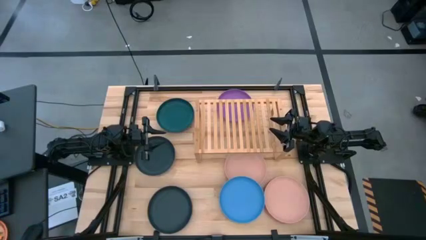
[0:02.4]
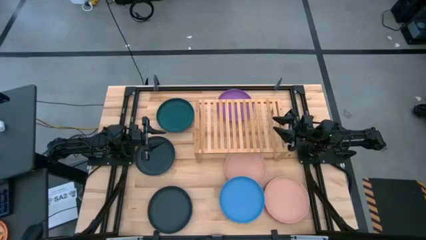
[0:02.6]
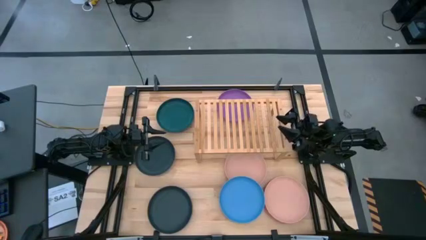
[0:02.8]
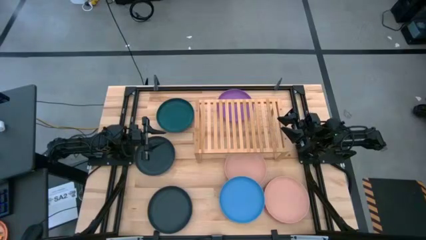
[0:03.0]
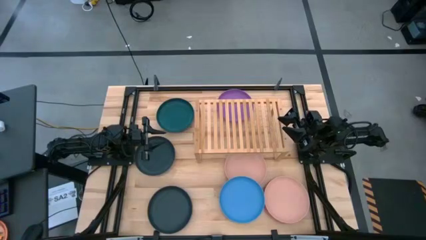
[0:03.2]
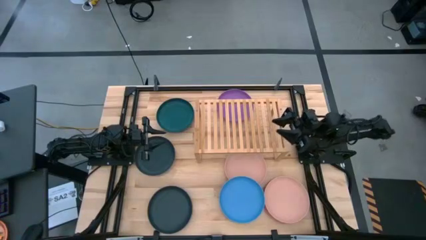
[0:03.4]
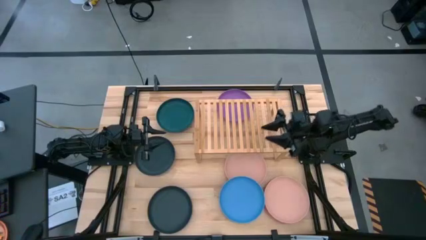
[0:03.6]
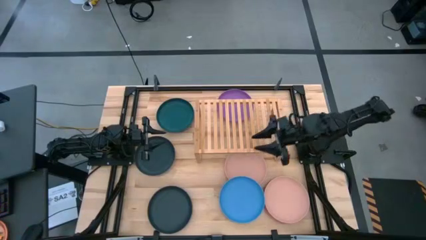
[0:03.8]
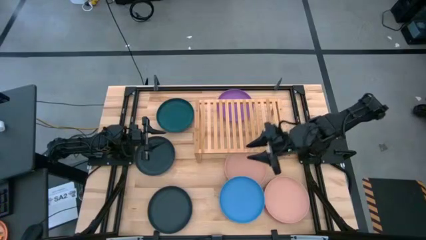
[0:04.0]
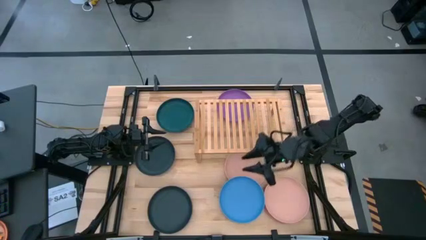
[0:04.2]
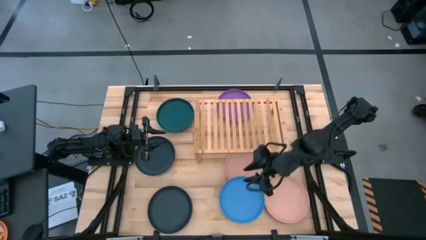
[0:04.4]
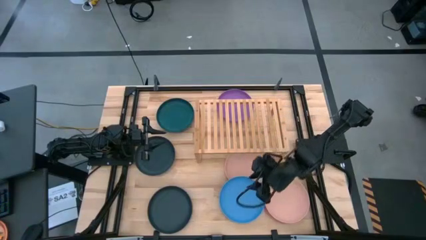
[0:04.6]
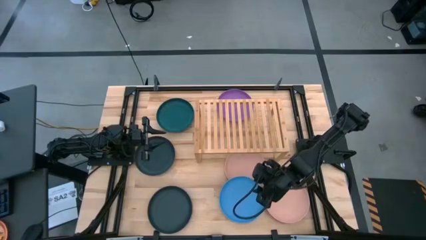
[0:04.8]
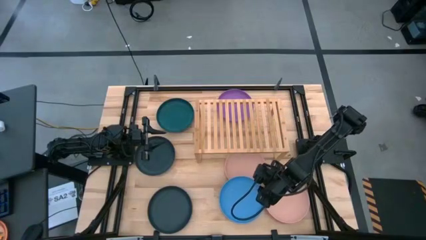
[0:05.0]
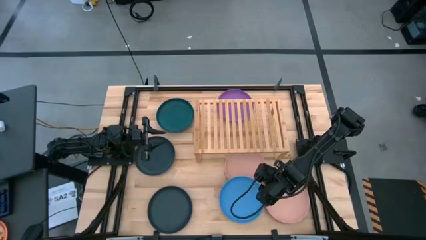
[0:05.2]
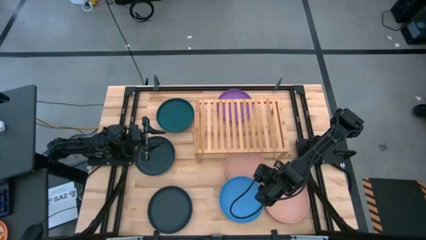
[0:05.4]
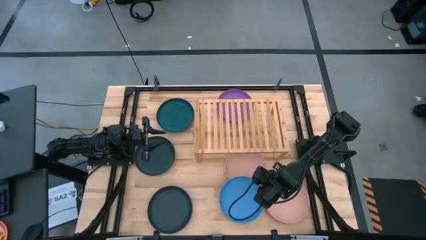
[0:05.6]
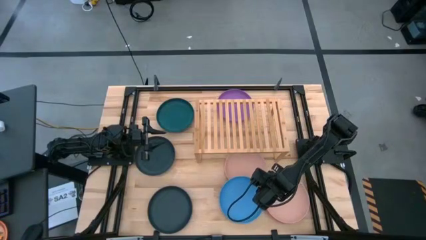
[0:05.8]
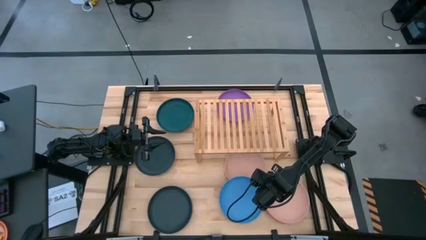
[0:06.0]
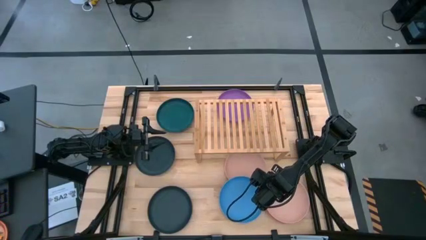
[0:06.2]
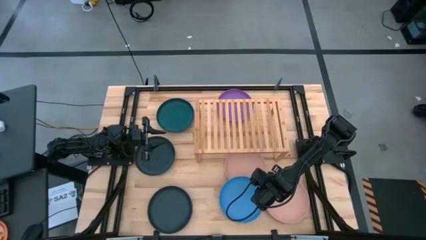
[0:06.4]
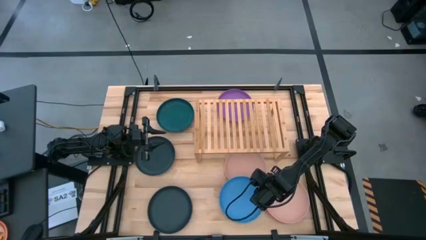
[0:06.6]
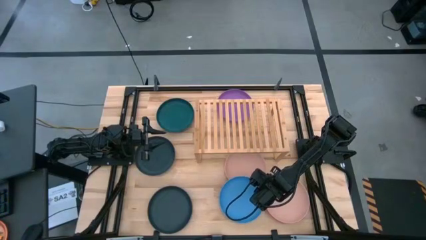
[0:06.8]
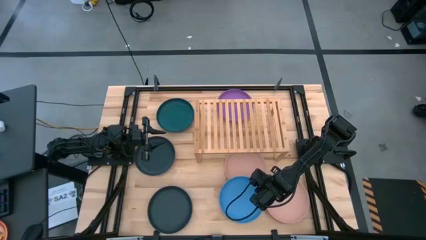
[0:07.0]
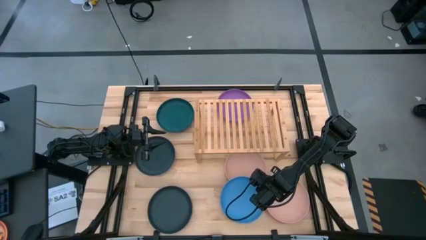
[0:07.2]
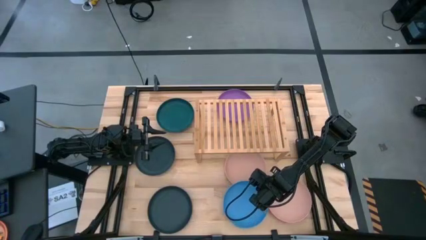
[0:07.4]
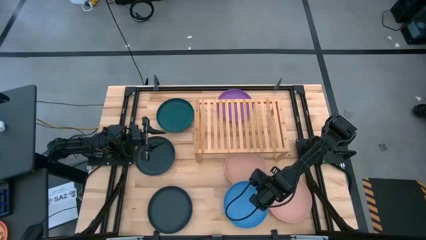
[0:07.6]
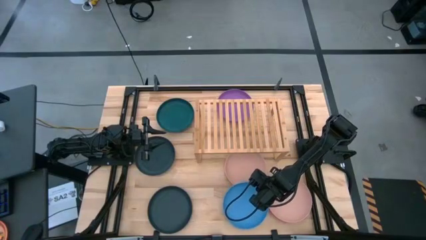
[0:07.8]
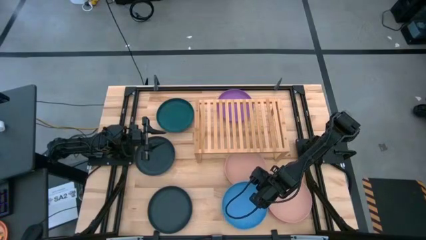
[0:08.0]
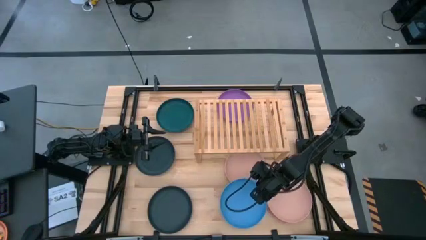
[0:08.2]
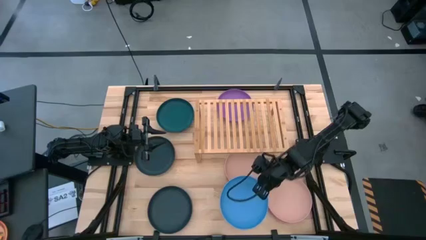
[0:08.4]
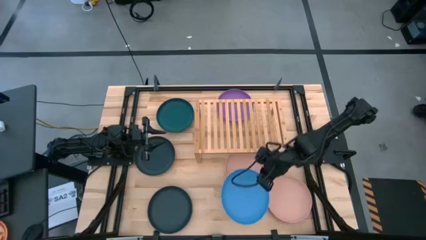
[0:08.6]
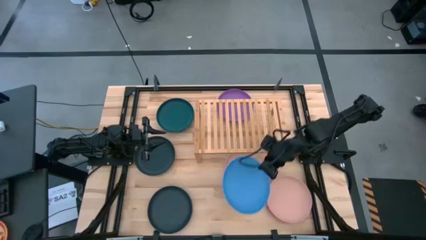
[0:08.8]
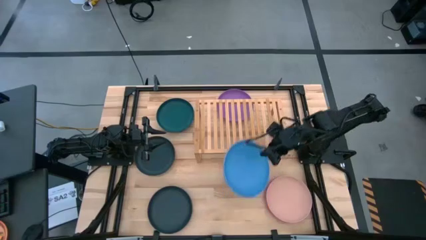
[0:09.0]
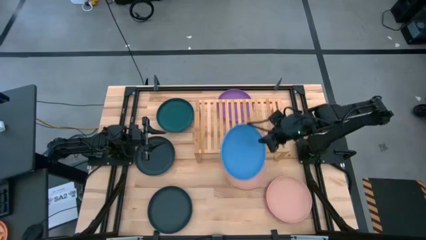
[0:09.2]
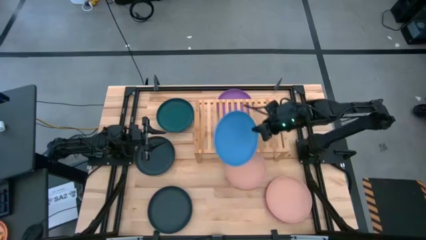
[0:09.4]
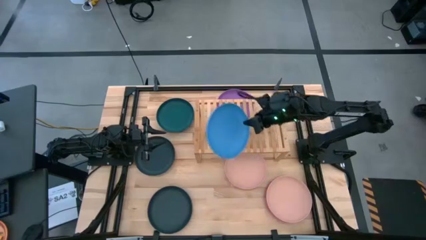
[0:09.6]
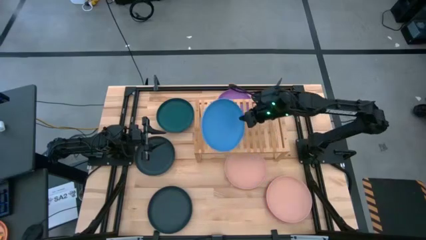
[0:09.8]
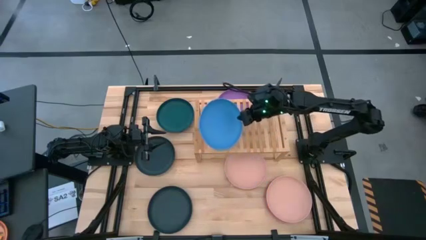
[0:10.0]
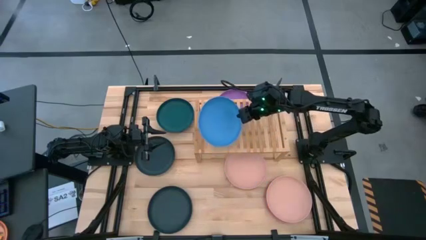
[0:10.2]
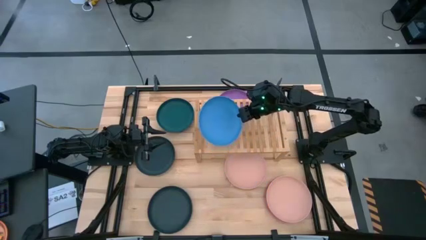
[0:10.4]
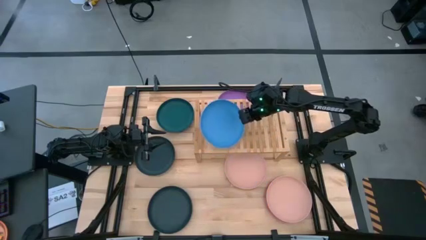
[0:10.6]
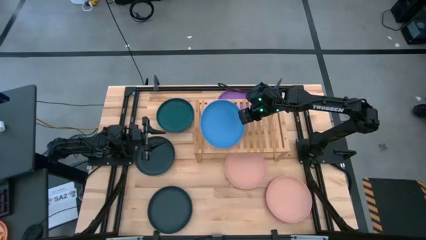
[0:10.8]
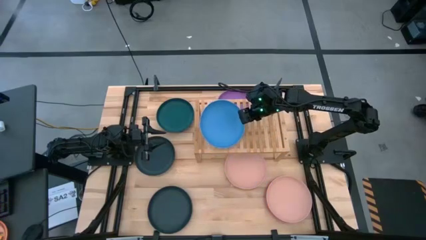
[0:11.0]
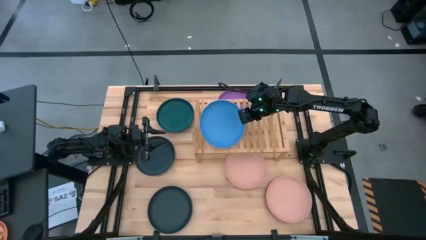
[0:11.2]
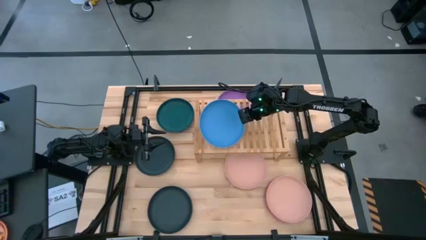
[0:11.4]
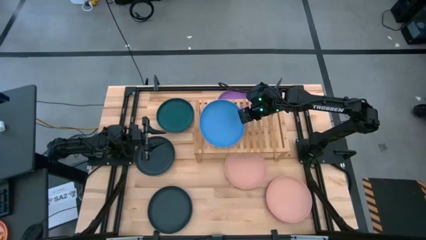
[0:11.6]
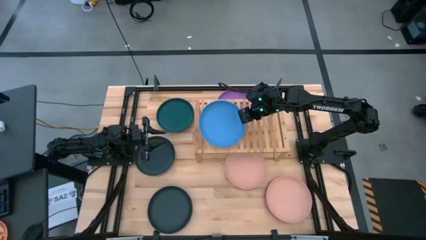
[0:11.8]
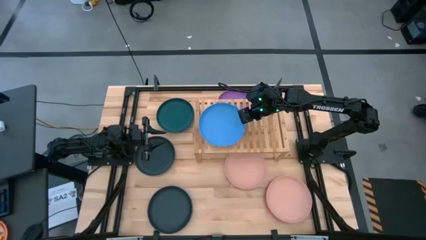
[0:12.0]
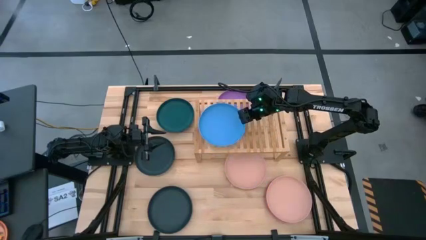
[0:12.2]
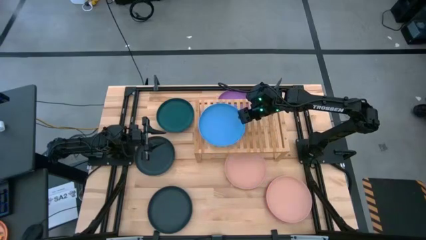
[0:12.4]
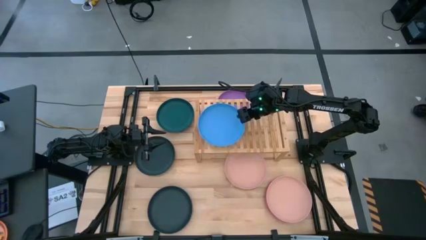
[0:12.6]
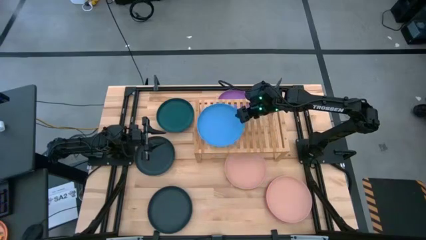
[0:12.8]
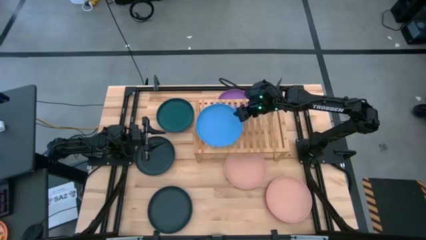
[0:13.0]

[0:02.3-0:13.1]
Task: Place and stack plates onto a shelf
Put the blue plate on the shelf
